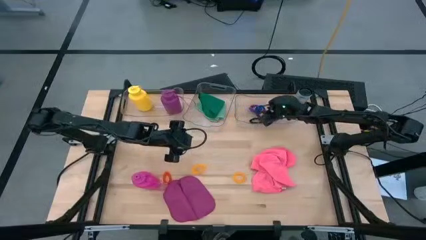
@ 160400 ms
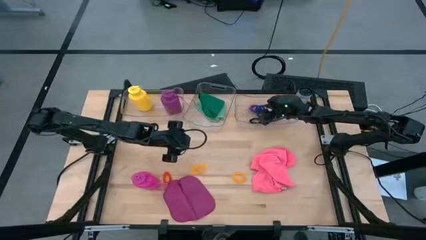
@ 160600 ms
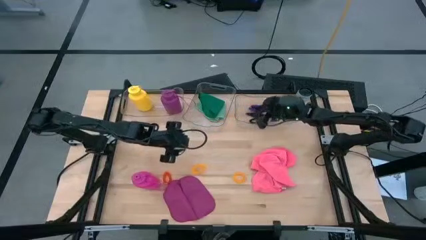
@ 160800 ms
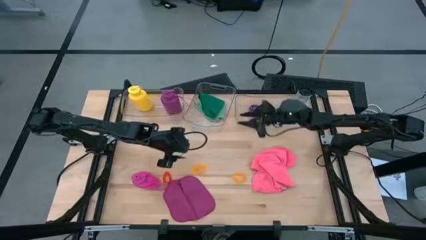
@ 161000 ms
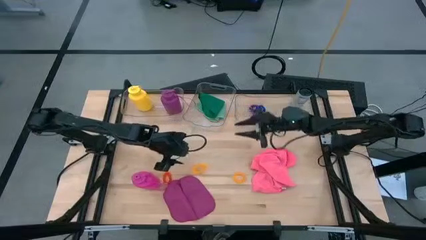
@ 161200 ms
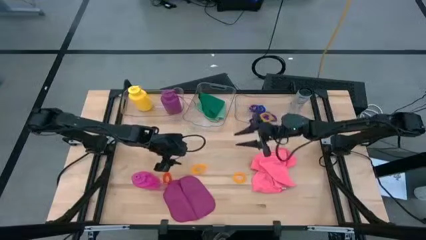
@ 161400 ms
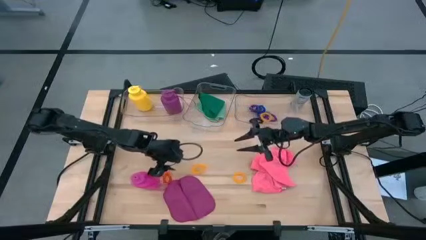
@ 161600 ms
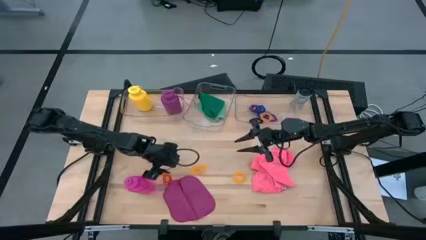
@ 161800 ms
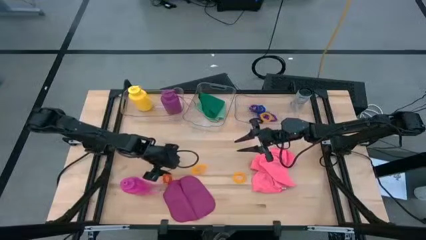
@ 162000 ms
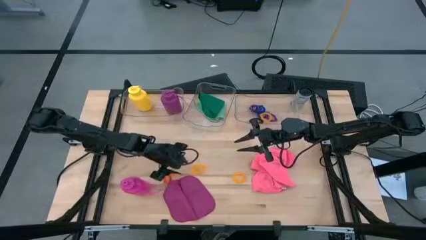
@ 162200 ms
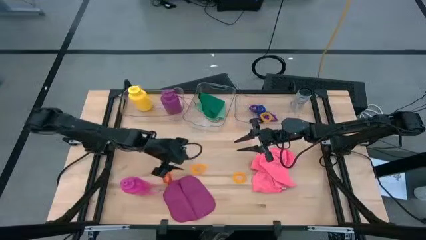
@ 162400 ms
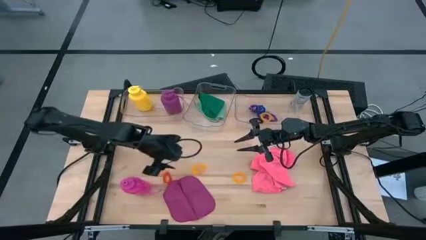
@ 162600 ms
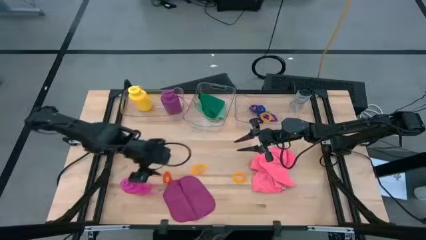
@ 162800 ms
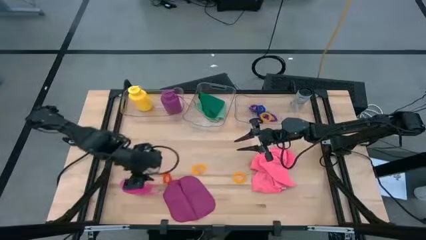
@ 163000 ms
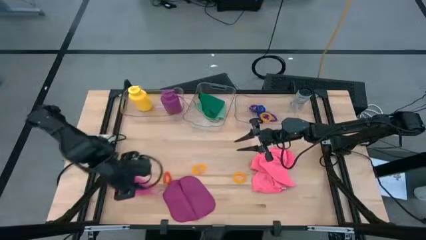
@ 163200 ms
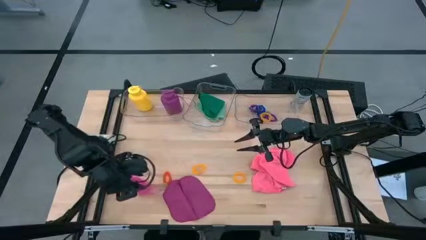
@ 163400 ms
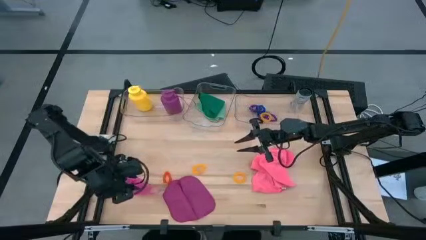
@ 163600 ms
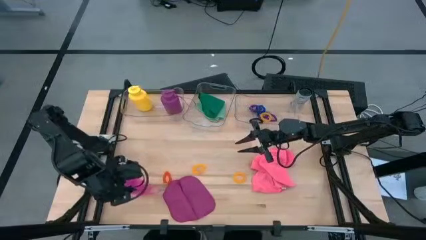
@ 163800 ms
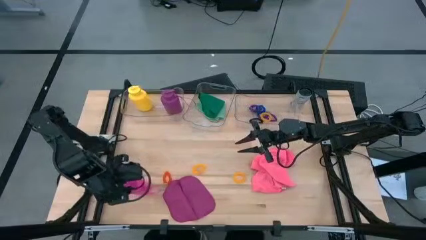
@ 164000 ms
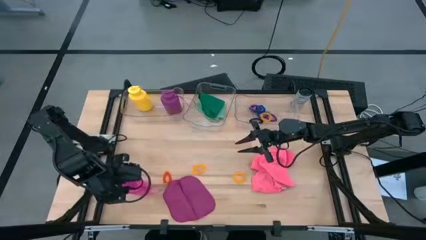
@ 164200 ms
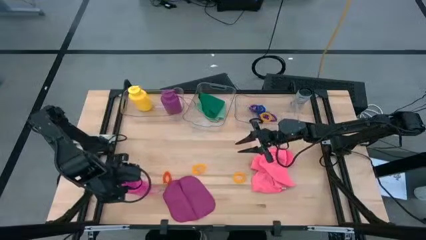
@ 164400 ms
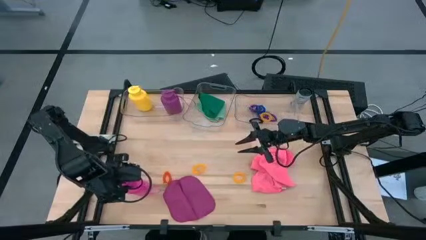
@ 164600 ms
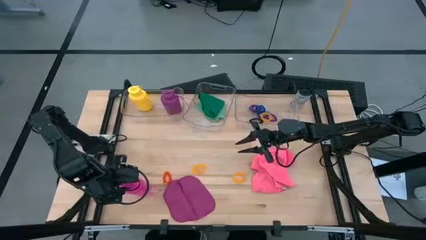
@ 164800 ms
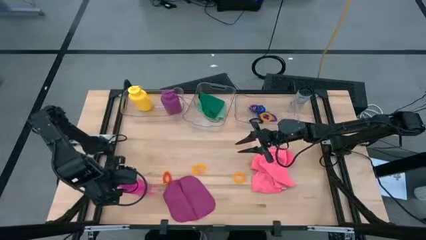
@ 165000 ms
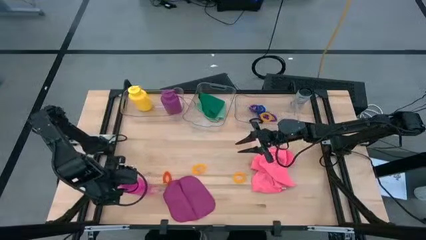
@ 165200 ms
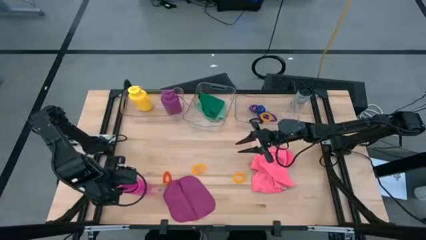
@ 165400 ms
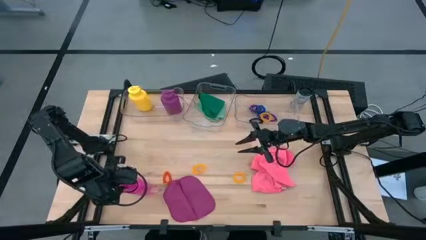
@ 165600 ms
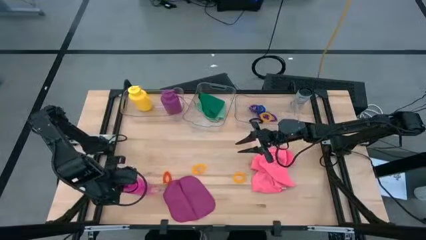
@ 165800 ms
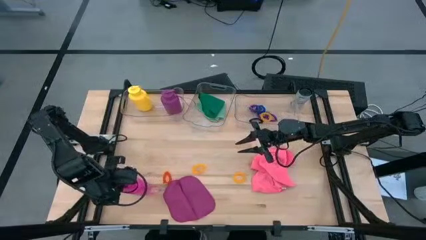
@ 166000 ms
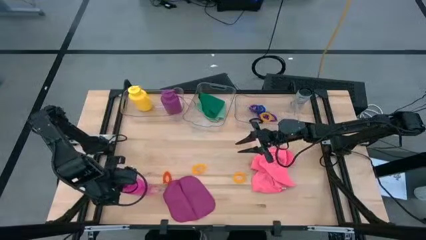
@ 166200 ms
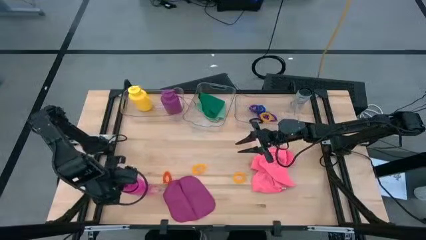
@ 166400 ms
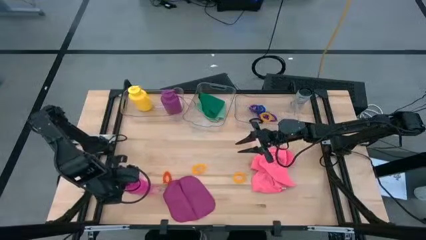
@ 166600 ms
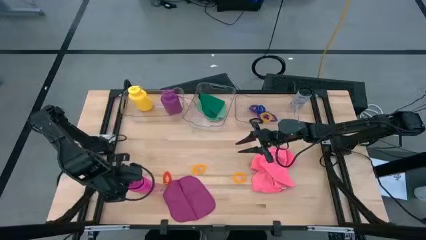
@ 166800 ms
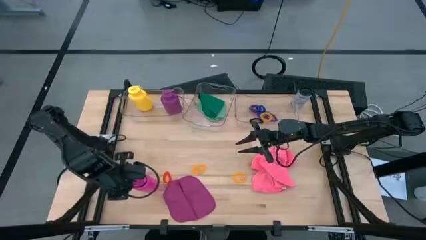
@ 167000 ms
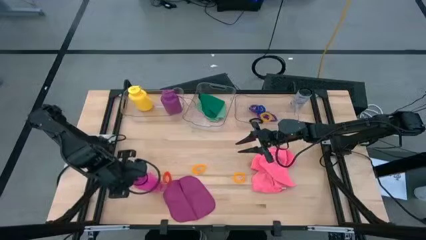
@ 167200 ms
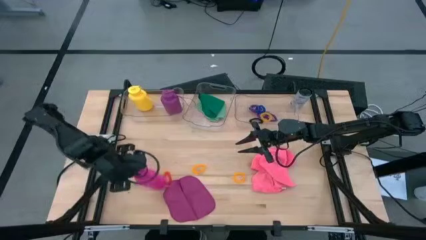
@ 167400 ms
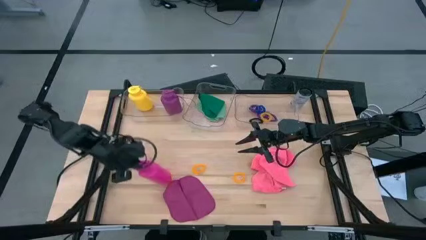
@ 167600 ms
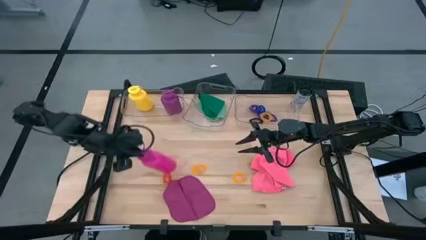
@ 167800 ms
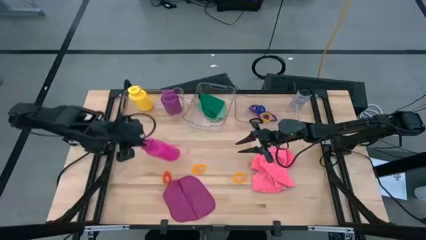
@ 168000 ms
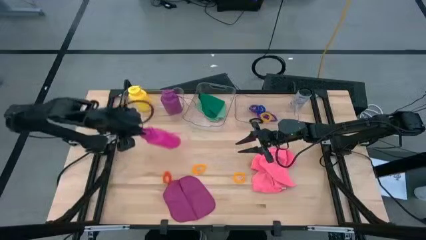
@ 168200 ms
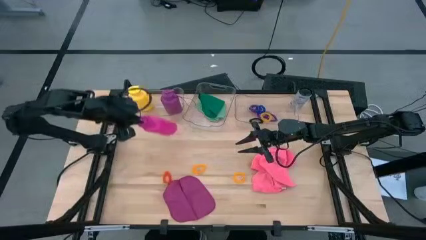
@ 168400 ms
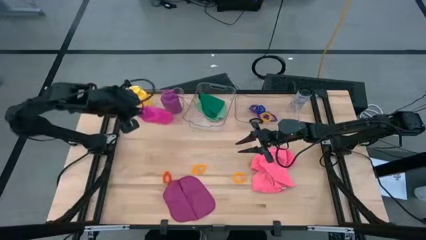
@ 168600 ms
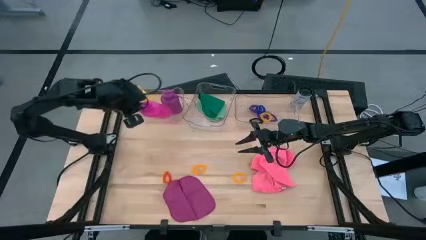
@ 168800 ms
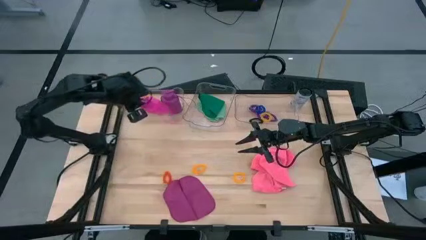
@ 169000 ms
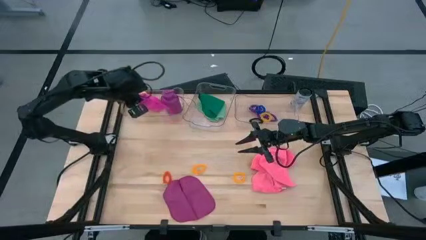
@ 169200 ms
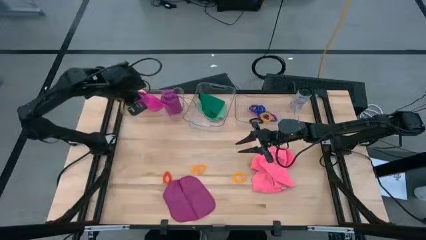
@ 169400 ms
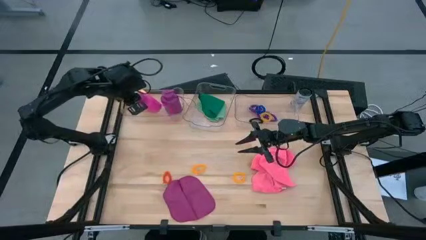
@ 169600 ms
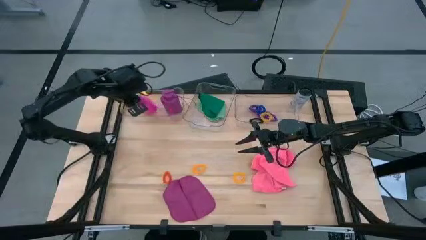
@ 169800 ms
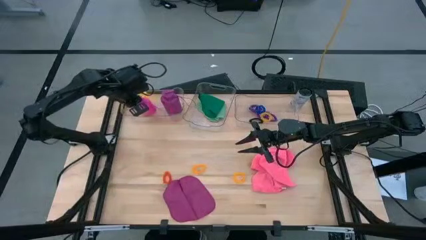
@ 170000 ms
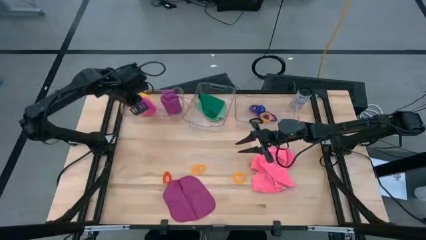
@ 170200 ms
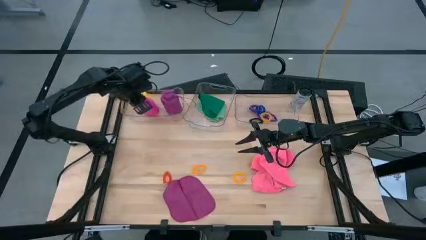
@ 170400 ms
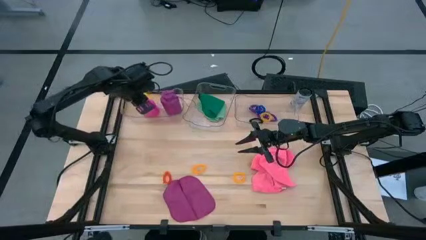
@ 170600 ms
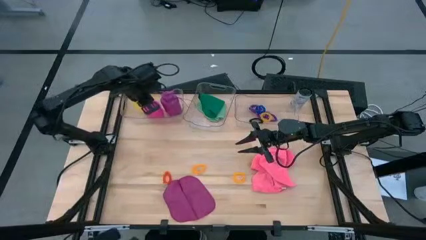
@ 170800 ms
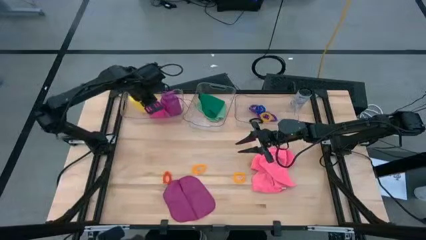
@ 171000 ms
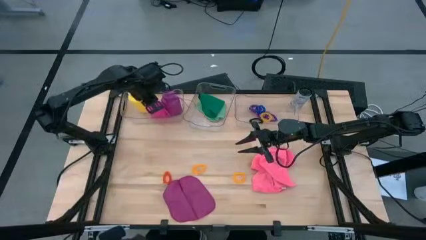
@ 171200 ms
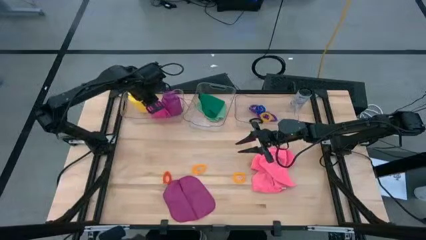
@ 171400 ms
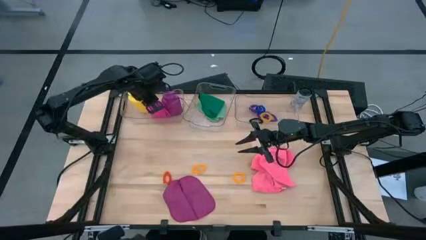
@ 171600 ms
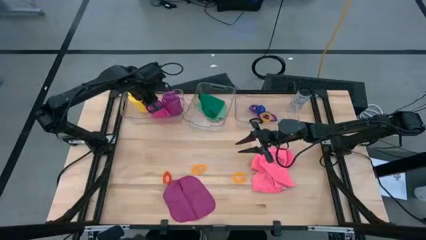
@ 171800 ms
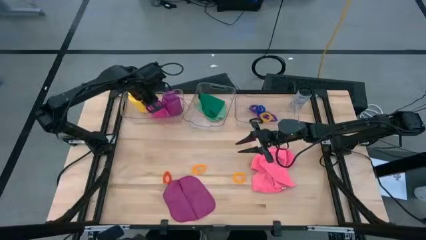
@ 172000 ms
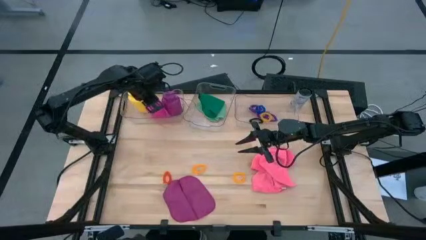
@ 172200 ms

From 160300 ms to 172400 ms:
Task: Pick & Place Sports Items
Put the pink water bottle into the left transparent bin

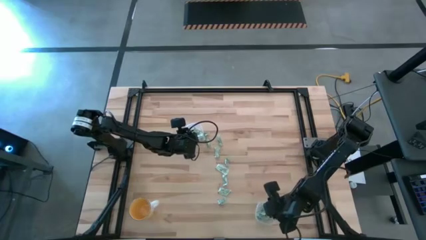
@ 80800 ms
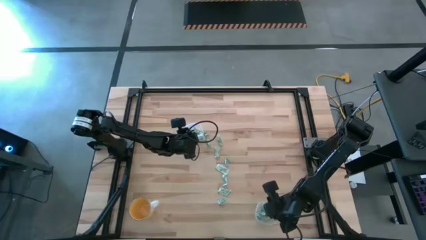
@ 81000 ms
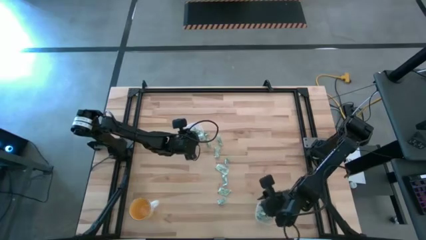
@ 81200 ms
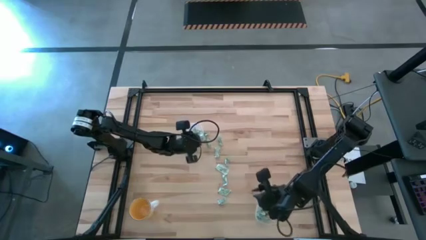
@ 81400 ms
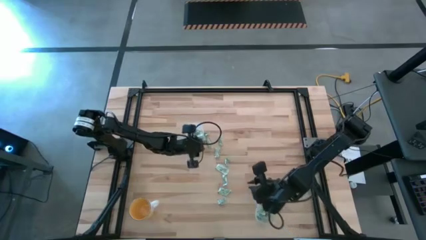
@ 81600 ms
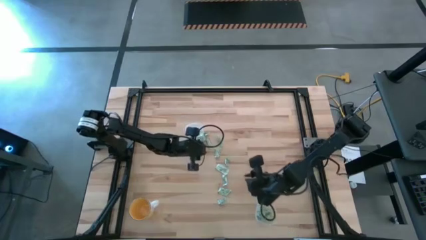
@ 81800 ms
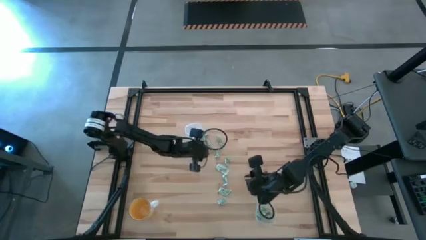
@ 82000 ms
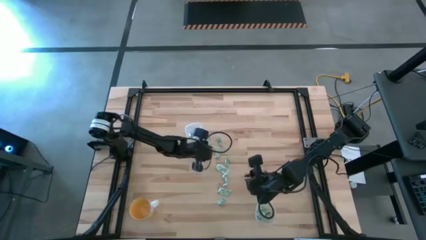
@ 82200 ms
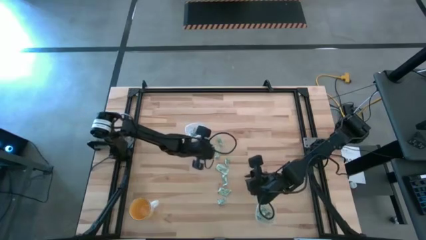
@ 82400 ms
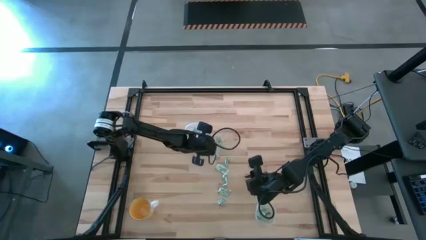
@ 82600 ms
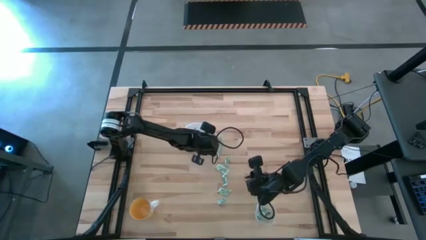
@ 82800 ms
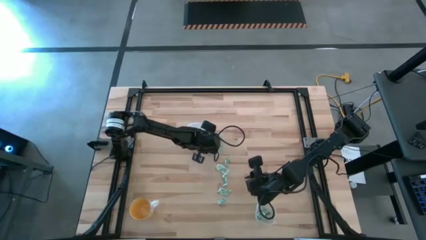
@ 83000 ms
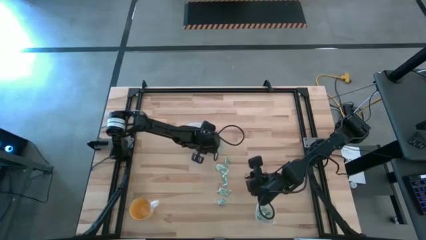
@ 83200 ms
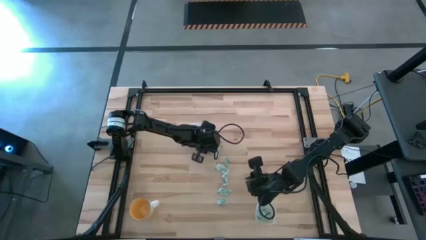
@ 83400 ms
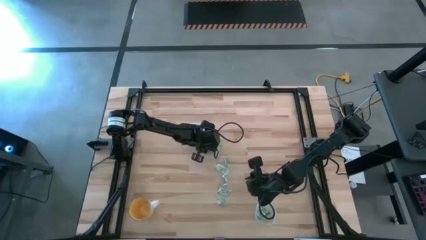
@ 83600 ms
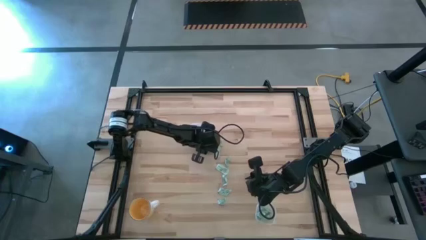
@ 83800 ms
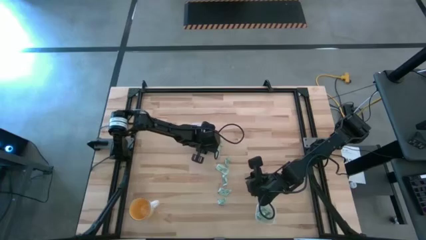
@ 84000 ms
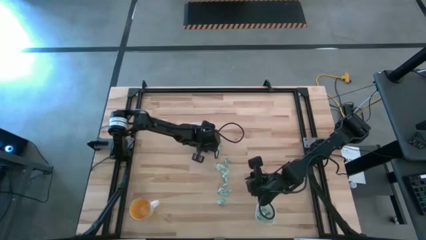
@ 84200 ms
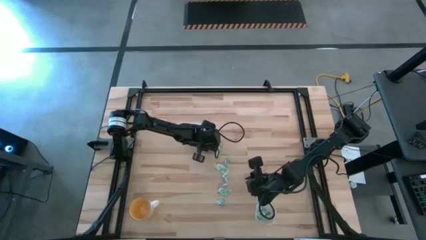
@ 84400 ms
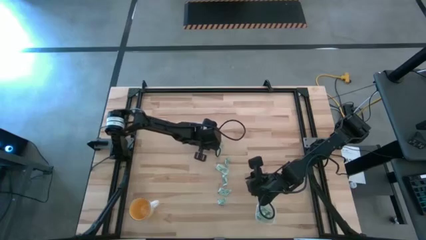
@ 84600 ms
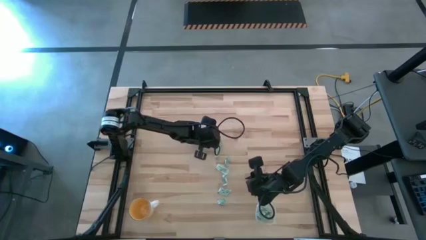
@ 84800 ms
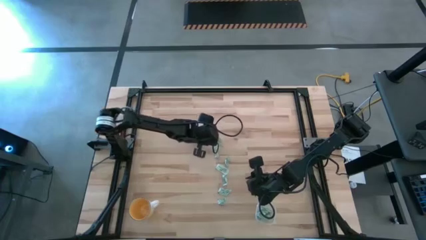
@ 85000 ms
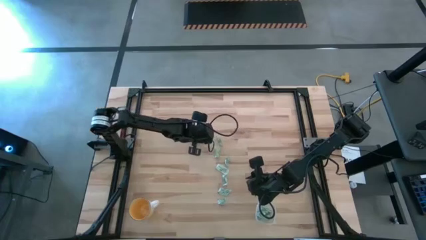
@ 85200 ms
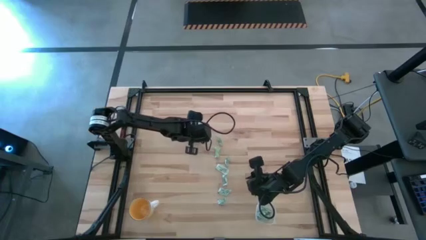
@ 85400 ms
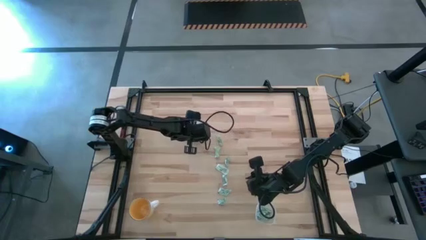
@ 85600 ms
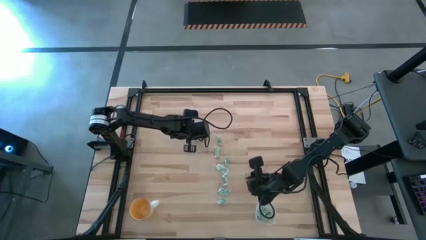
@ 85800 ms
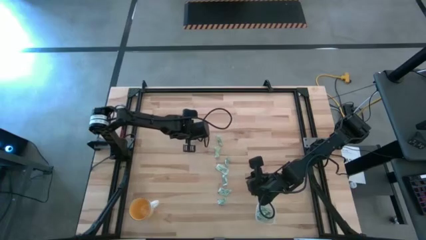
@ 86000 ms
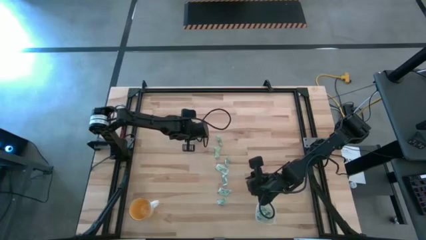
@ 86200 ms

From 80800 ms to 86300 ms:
Task: Pick and place Stevia / Truvia into bins
Put the stevia packet into the top transparent container
